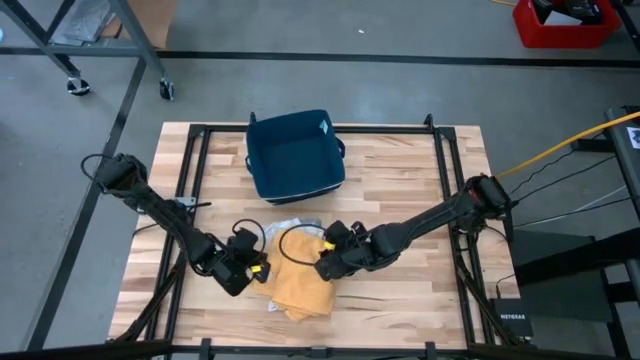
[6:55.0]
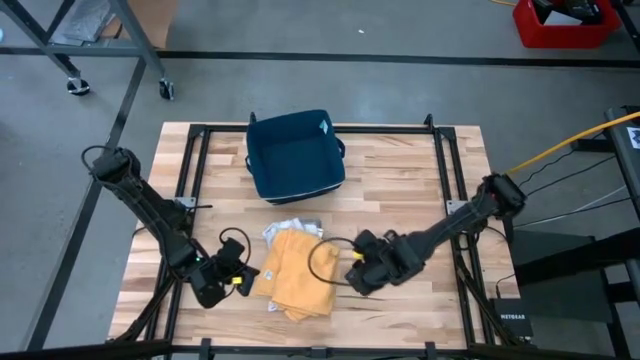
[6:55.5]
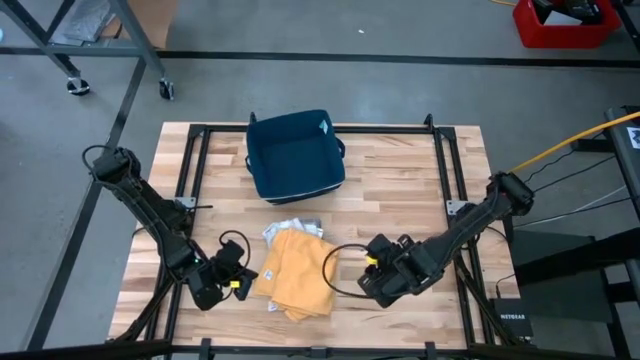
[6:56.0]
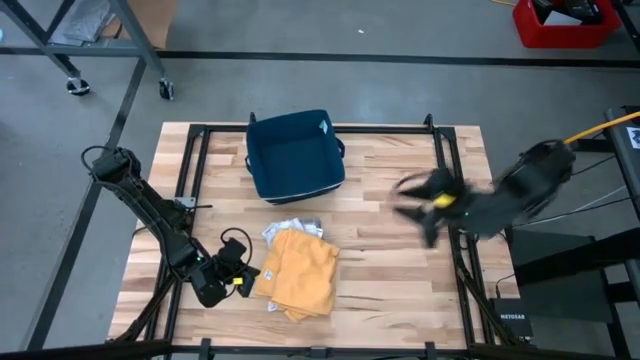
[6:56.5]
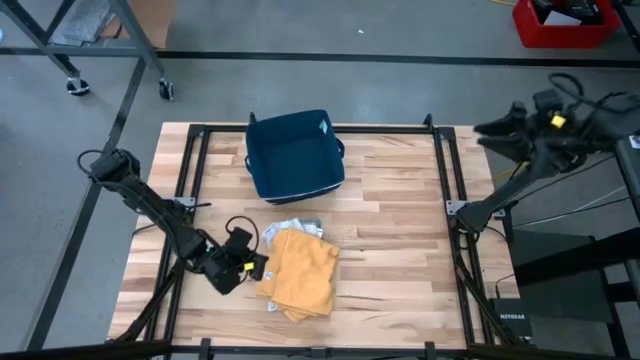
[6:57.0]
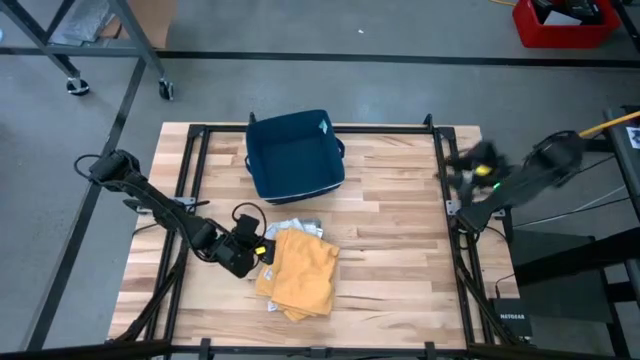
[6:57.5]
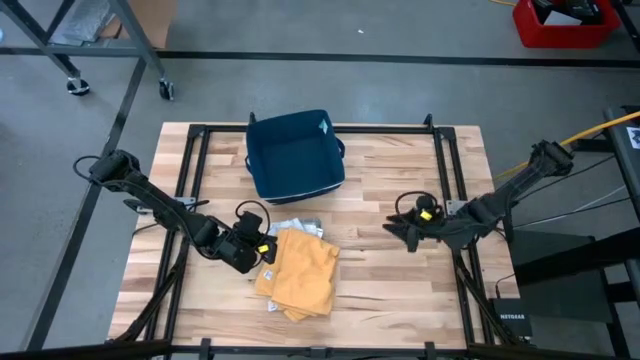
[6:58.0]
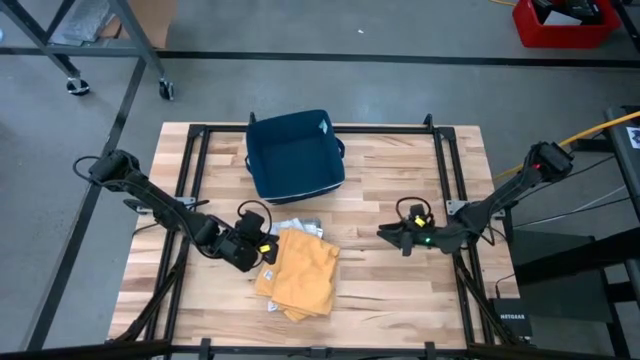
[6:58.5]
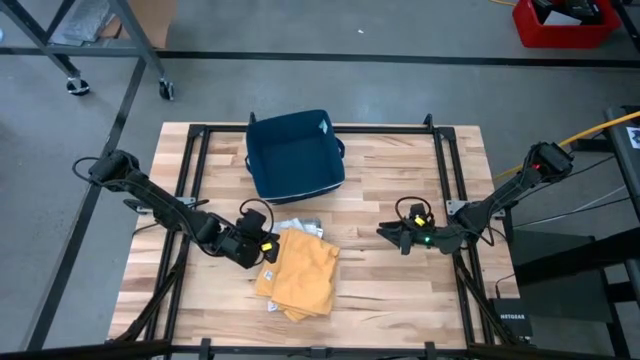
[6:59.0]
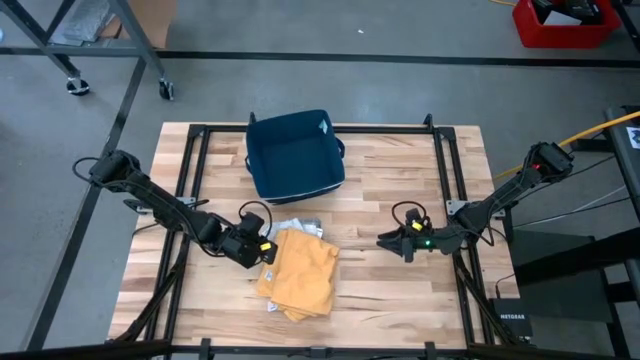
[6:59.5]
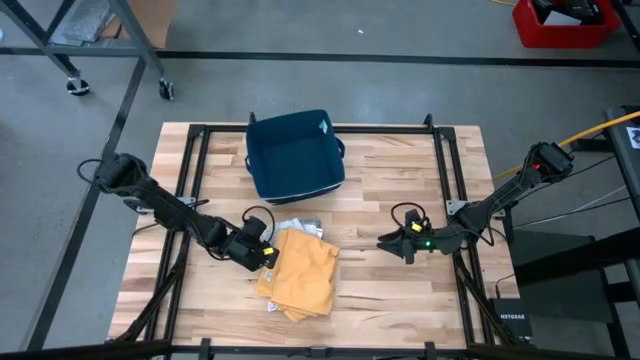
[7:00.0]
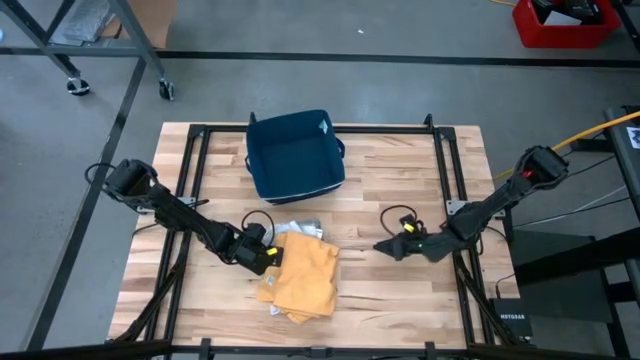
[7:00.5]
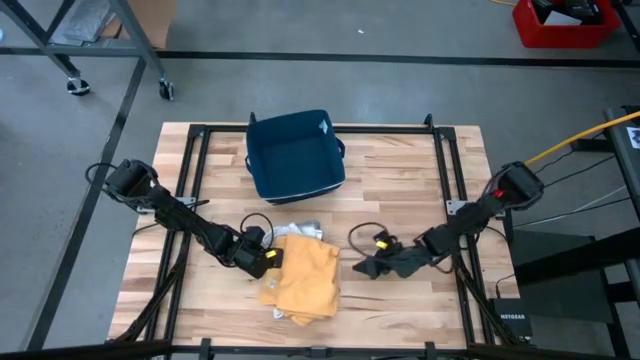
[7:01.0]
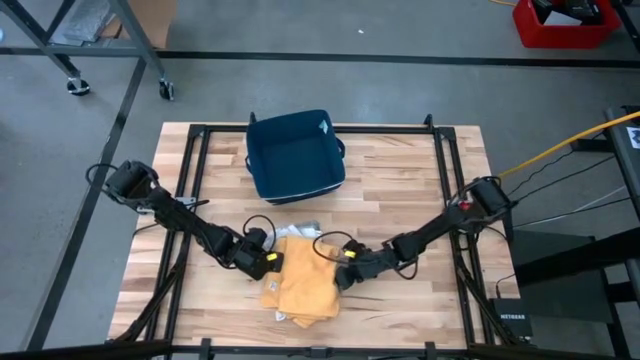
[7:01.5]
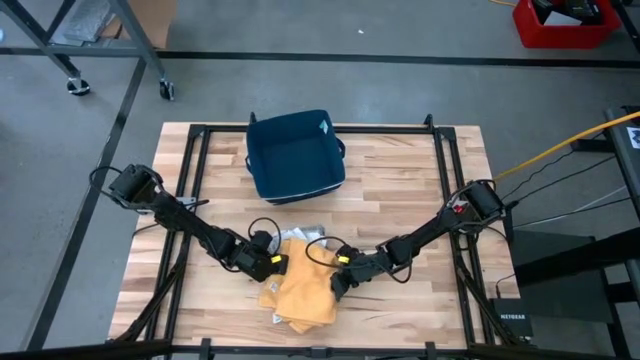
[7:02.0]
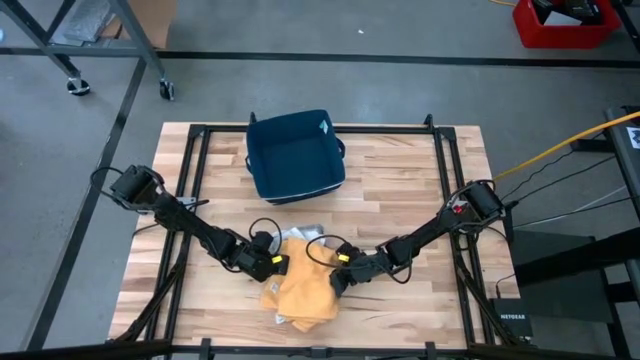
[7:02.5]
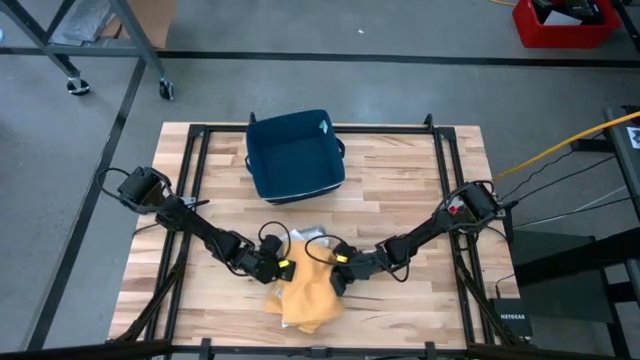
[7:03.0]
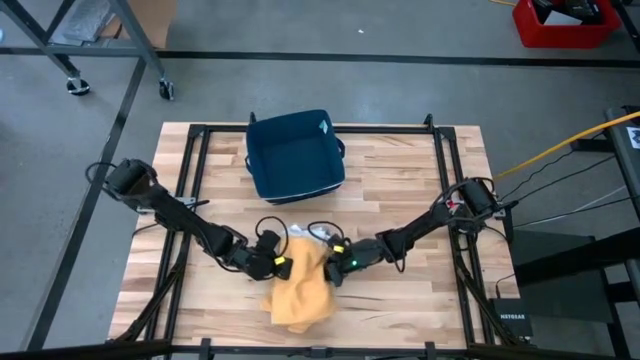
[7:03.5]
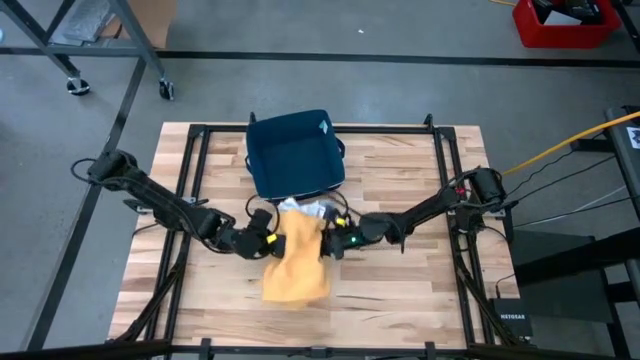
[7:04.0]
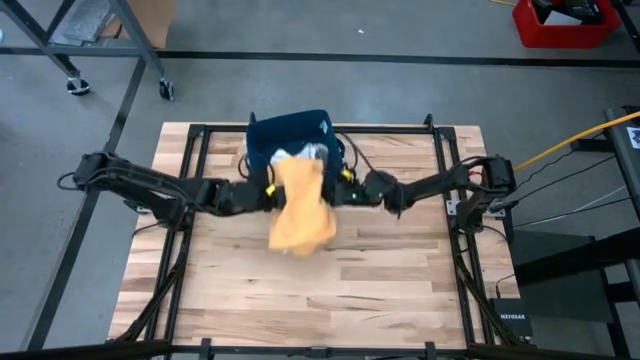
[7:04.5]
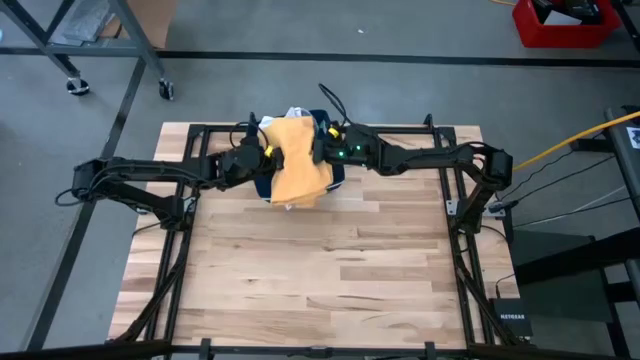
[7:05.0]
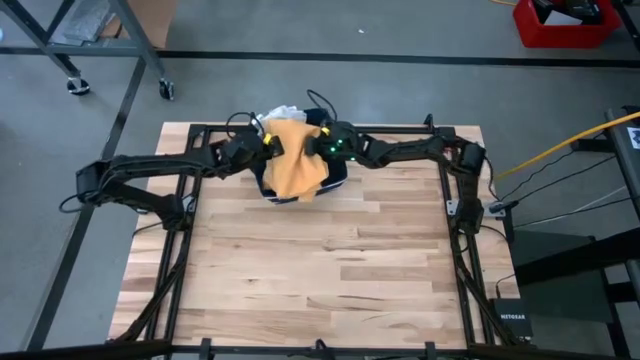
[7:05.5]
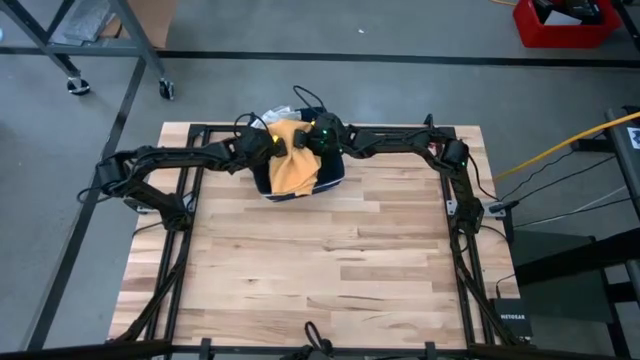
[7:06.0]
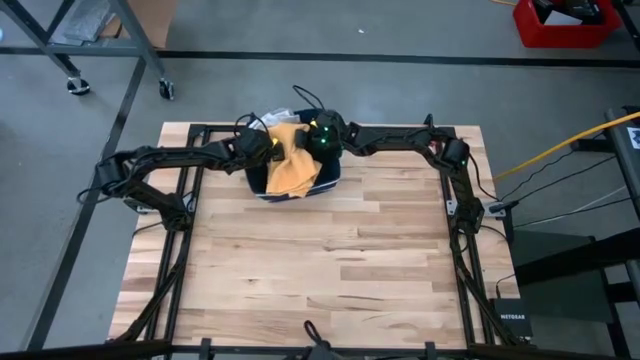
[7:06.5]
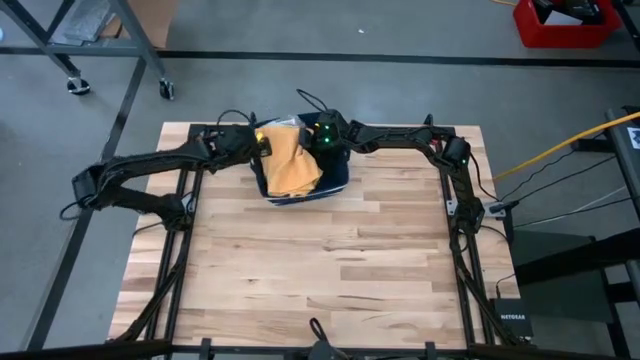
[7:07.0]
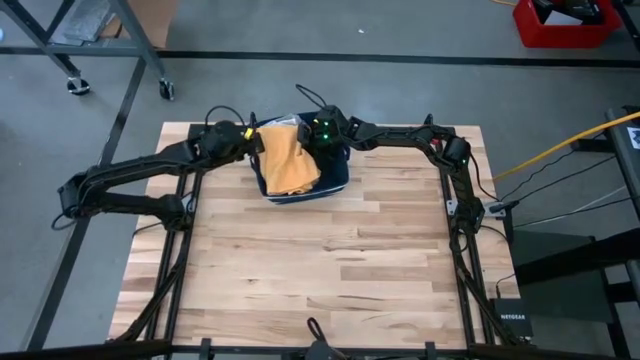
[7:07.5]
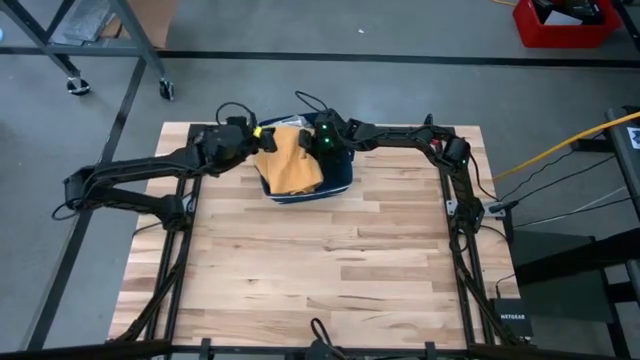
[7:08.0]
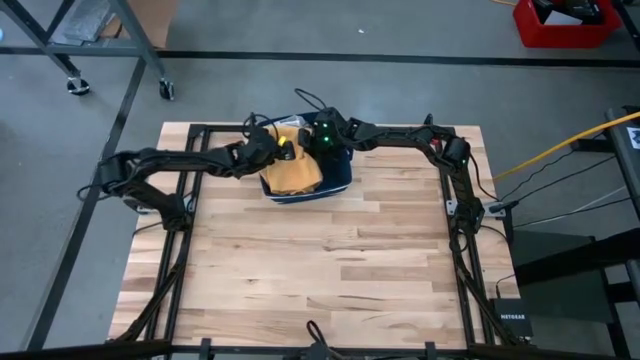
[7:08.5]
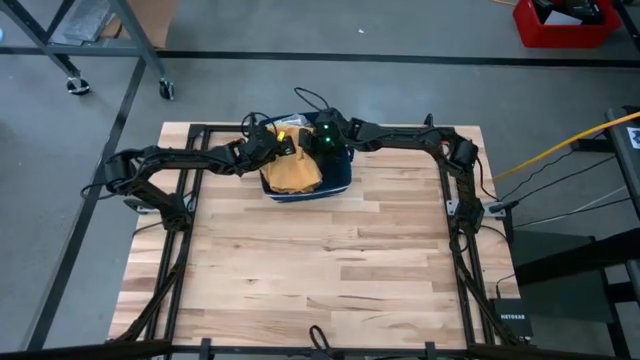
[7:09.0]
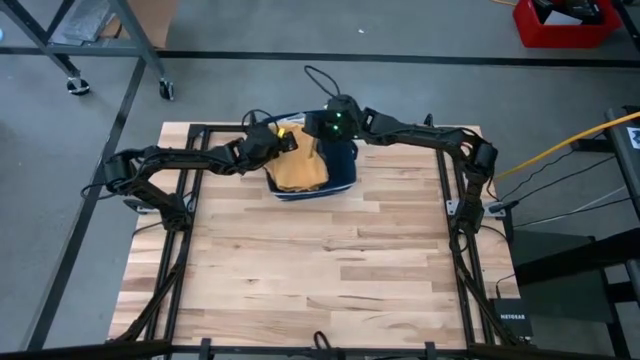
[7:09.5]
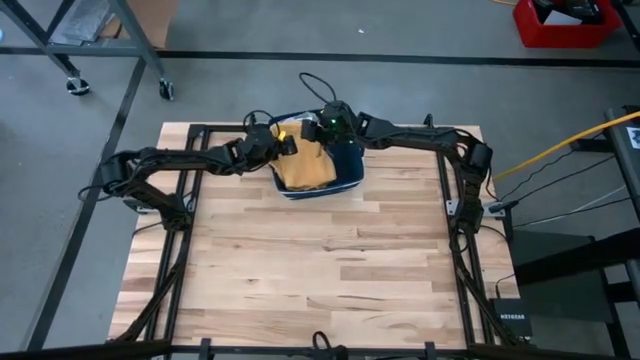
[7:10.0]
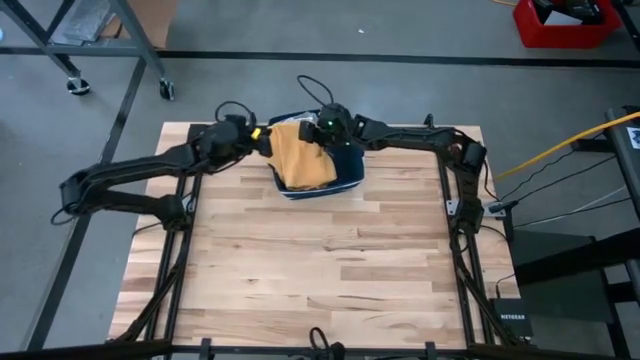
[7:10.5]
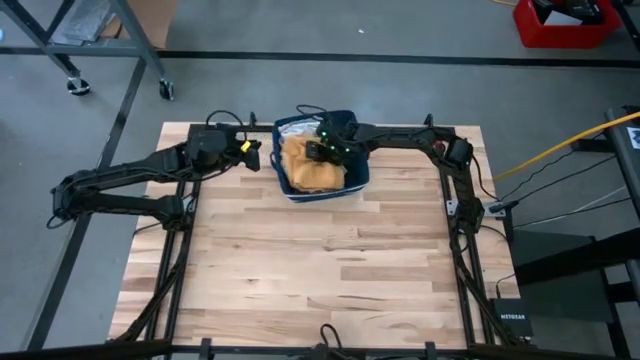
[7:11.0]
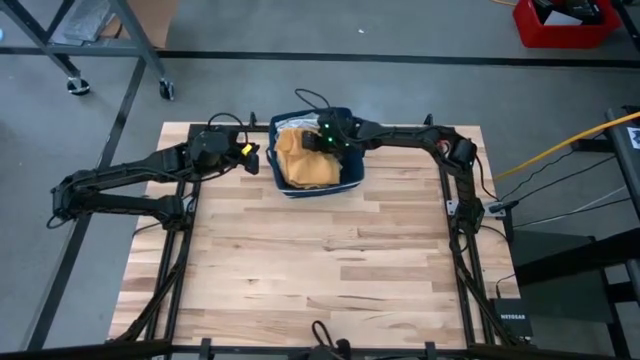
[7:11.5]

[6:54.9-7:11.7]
Task: Fold towel
Put the stacked folded colored towels into the blue laundry bin

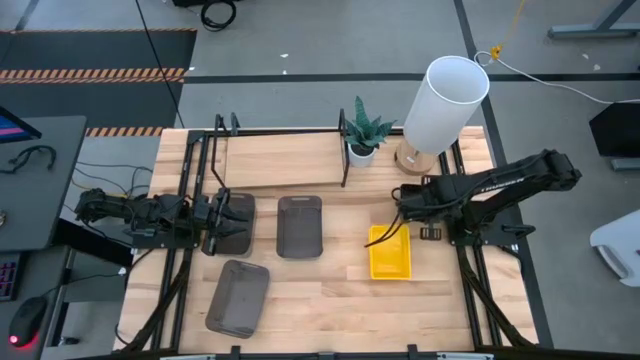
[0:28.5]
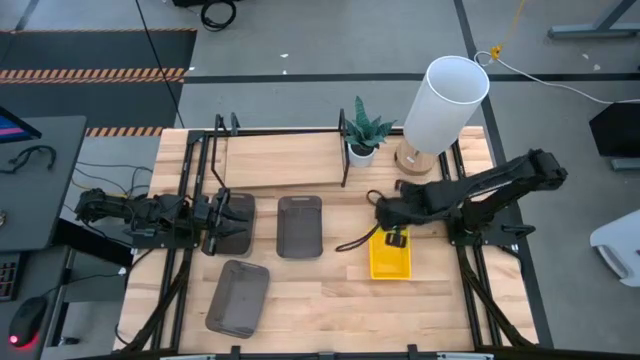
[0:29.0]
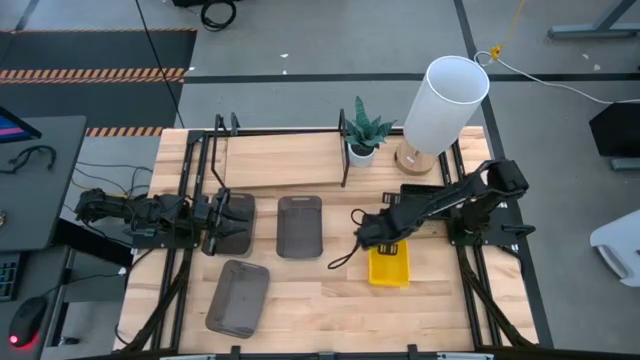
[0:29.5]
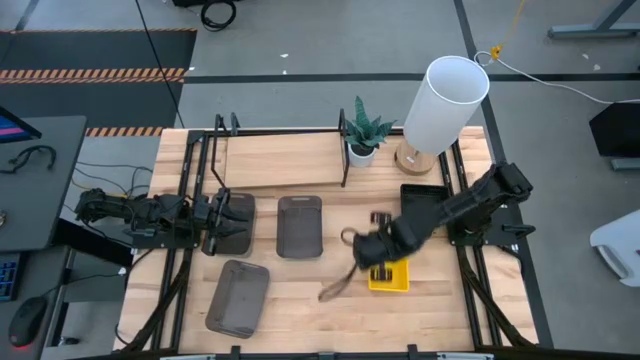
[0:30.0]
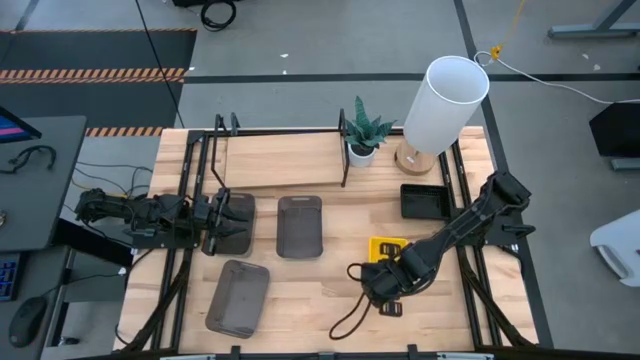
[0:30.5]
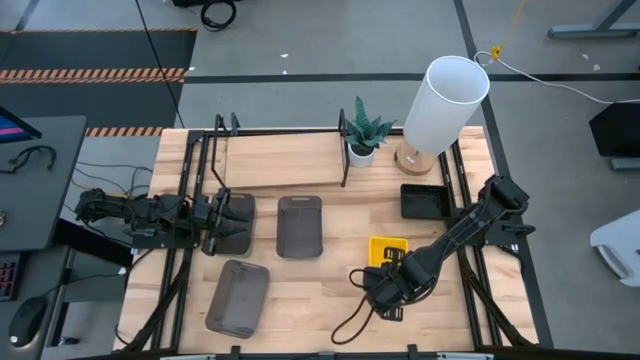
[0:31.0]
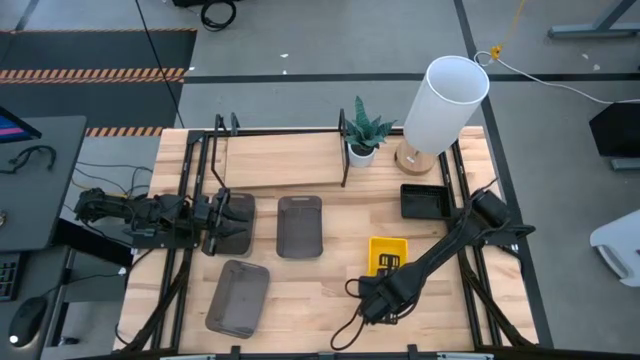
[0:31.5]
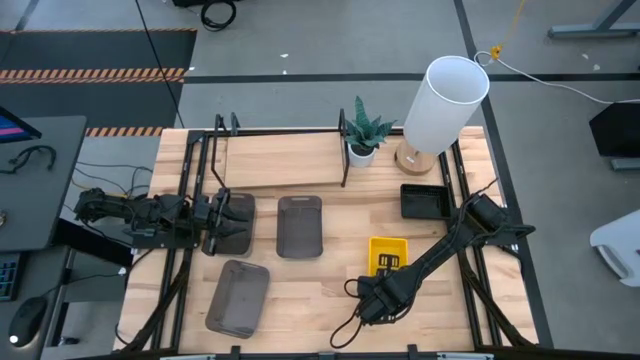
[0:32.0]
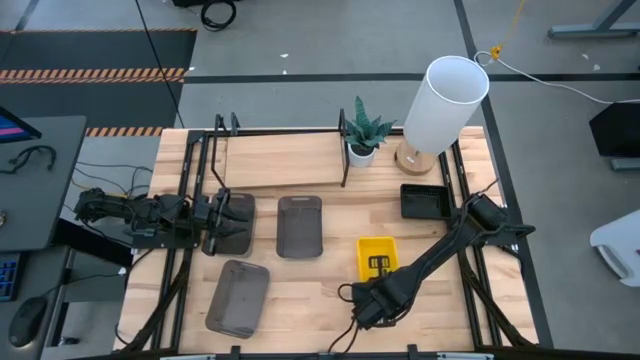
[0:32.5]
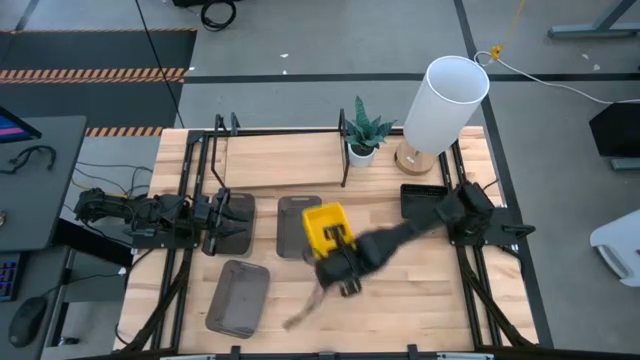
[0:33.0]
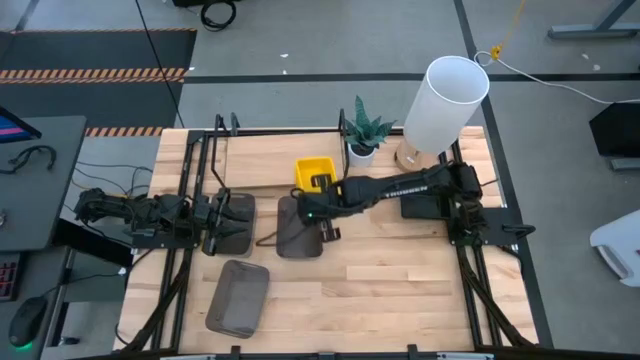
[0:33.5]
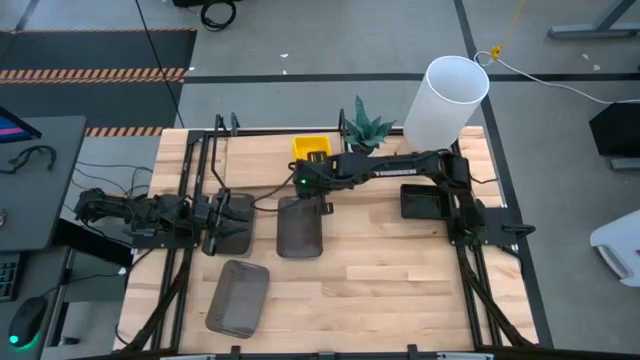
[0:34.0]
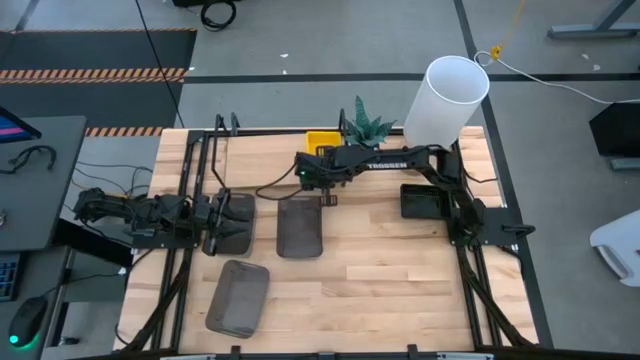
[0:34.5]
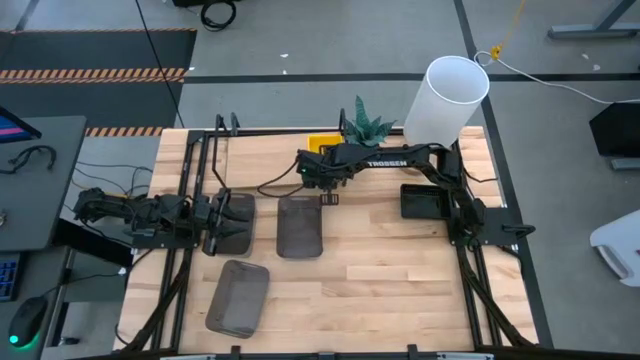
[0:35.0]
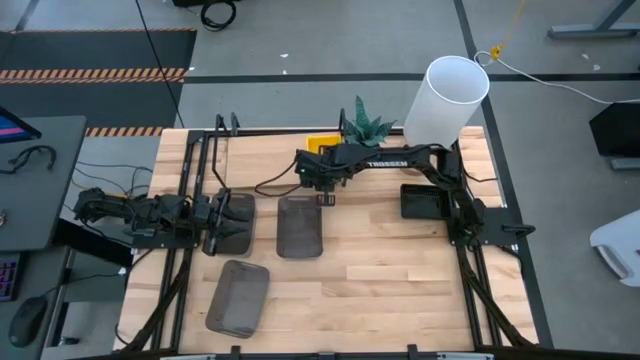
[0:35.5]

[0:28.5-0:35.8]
Task: Stack baskets on shelf by color
Put the yellow bins on the shelf
